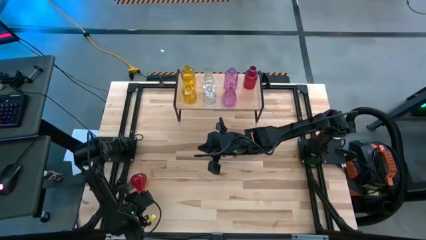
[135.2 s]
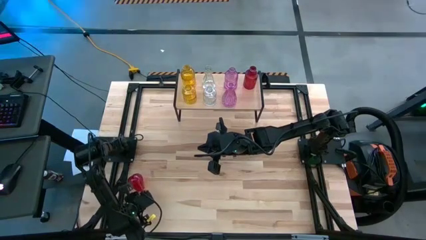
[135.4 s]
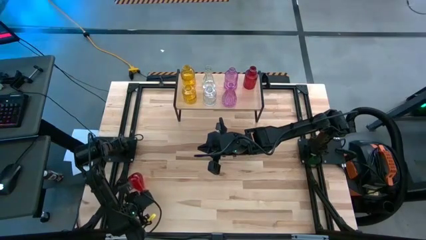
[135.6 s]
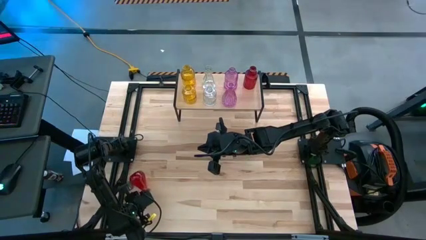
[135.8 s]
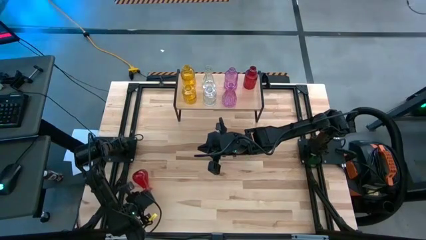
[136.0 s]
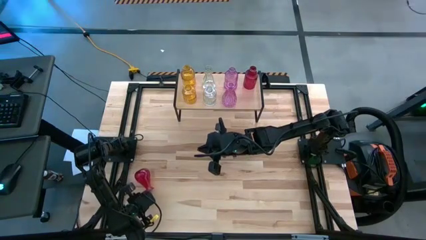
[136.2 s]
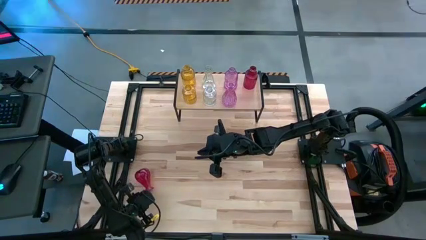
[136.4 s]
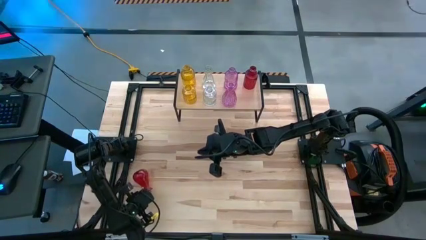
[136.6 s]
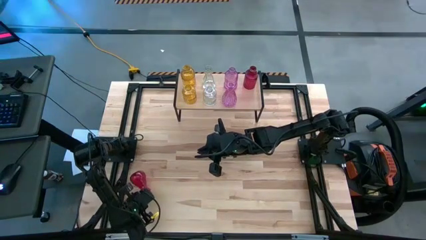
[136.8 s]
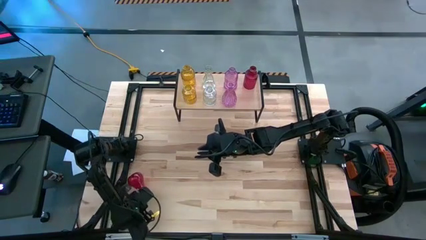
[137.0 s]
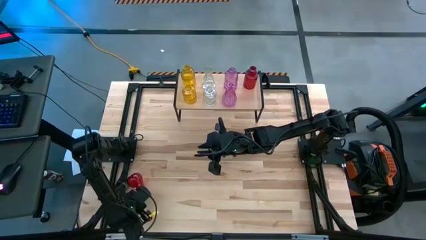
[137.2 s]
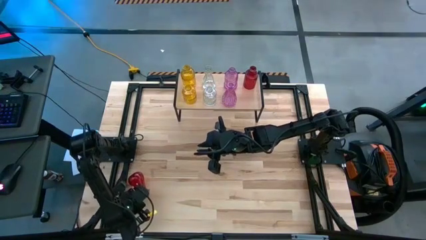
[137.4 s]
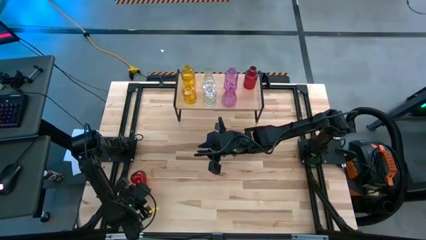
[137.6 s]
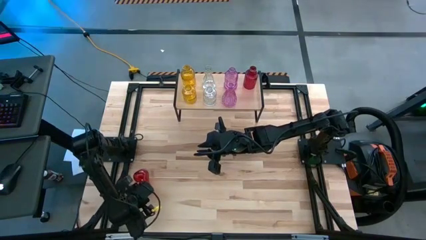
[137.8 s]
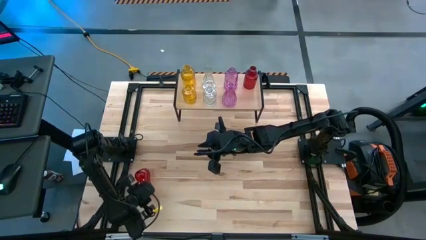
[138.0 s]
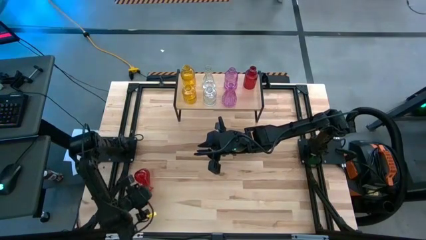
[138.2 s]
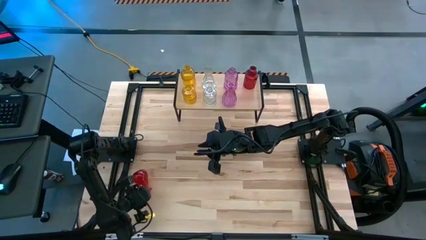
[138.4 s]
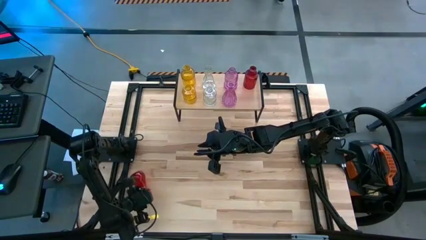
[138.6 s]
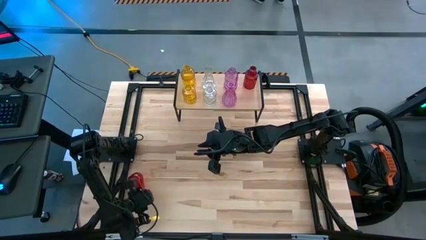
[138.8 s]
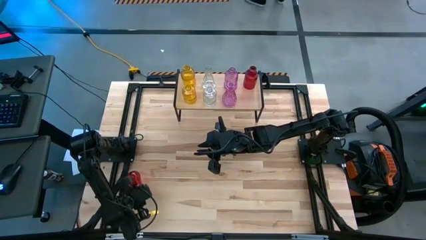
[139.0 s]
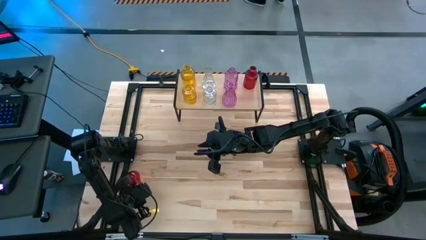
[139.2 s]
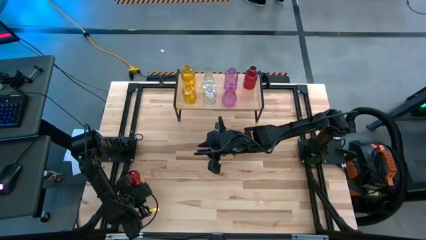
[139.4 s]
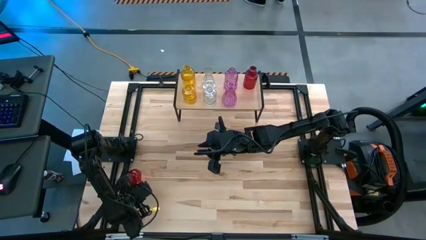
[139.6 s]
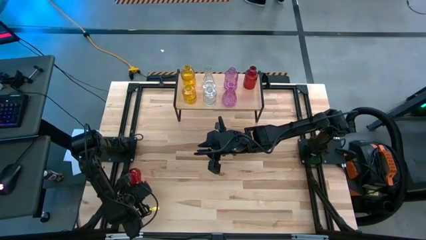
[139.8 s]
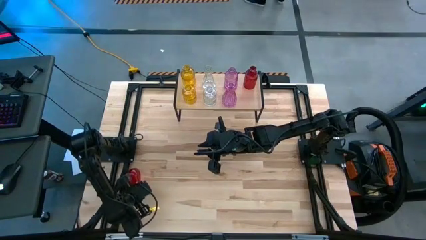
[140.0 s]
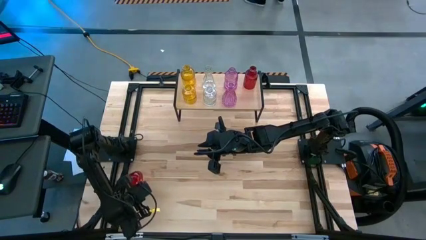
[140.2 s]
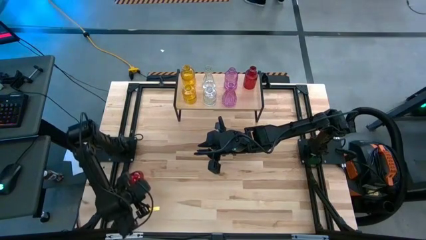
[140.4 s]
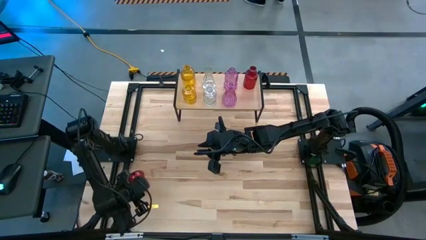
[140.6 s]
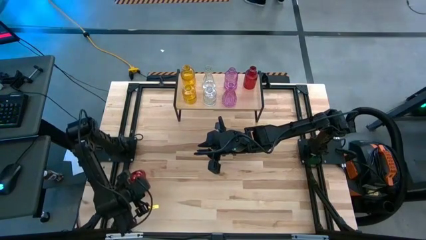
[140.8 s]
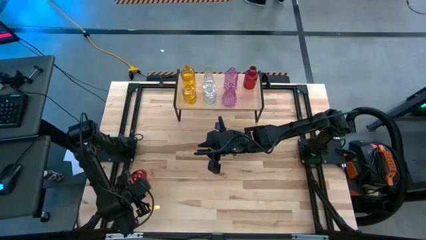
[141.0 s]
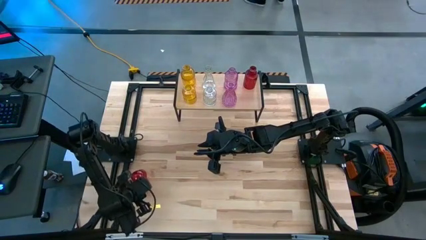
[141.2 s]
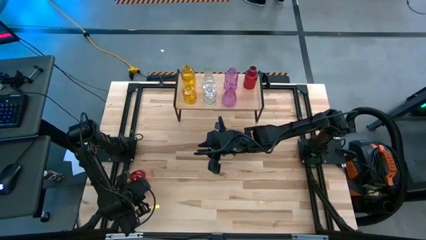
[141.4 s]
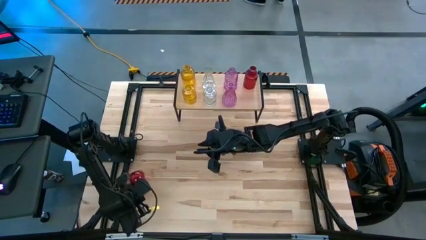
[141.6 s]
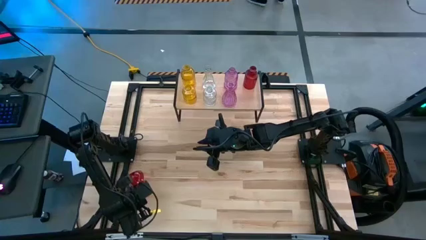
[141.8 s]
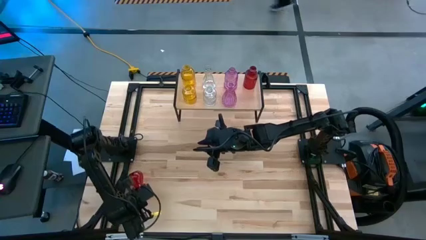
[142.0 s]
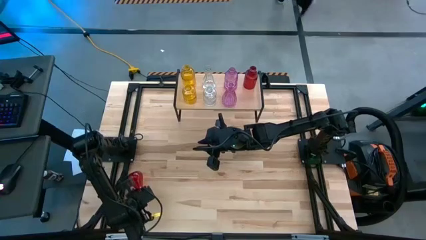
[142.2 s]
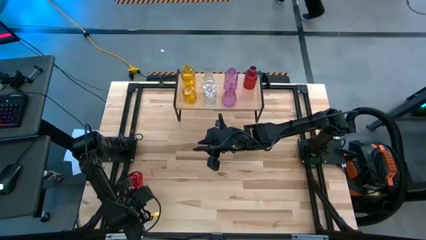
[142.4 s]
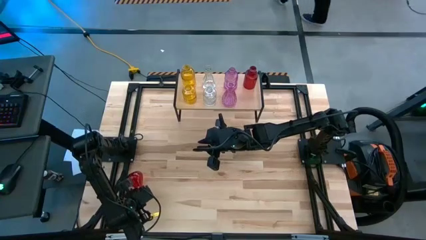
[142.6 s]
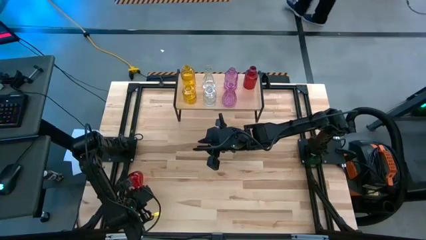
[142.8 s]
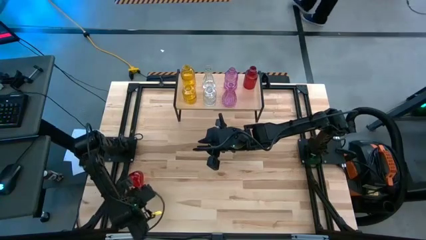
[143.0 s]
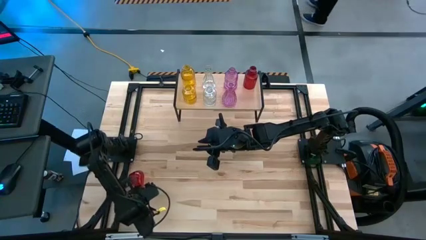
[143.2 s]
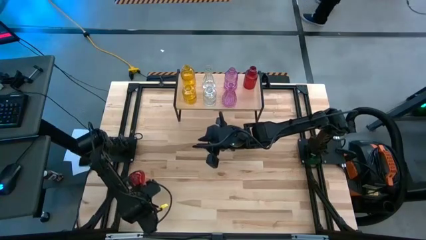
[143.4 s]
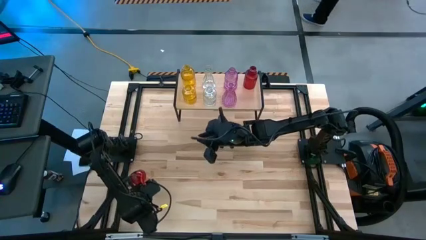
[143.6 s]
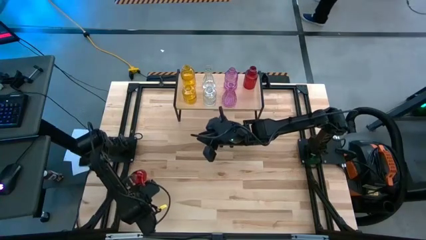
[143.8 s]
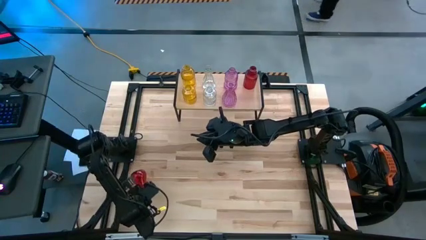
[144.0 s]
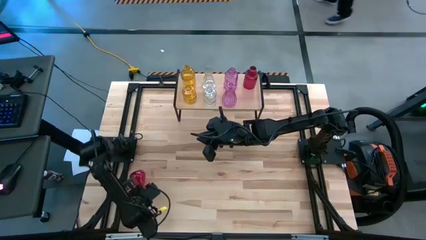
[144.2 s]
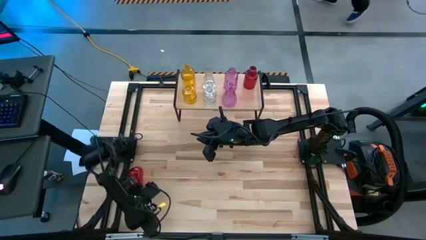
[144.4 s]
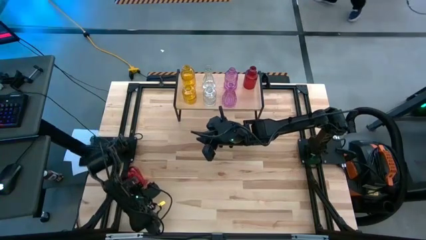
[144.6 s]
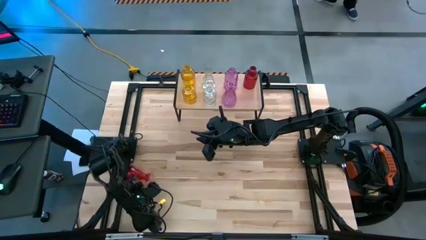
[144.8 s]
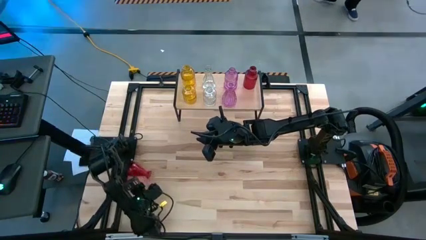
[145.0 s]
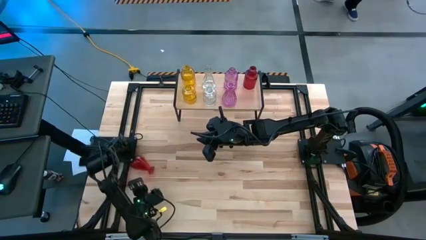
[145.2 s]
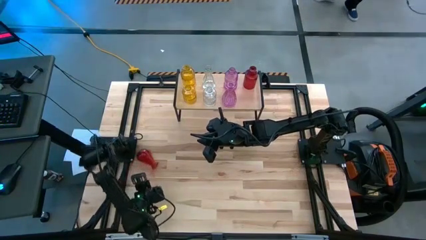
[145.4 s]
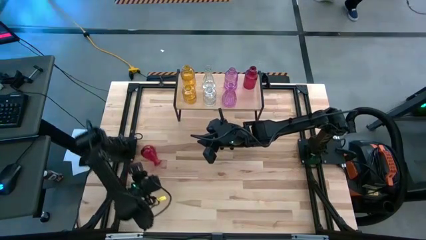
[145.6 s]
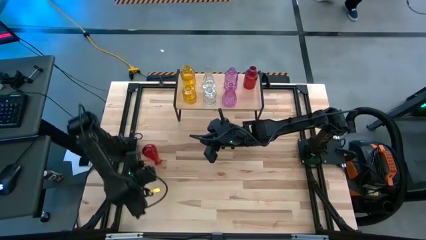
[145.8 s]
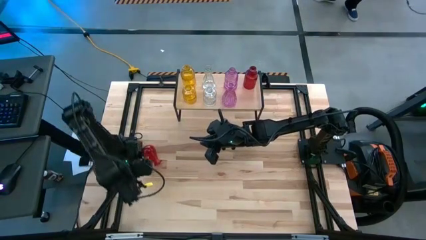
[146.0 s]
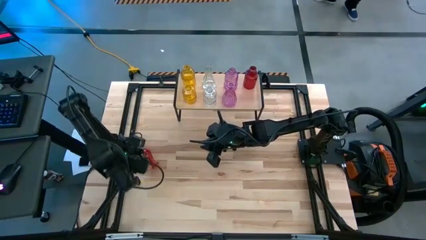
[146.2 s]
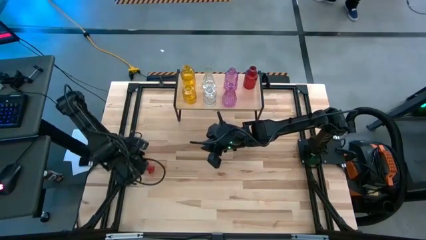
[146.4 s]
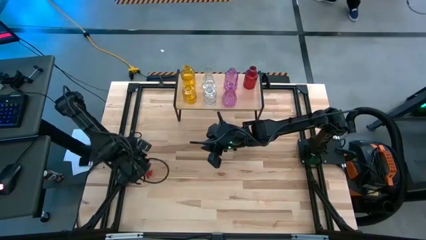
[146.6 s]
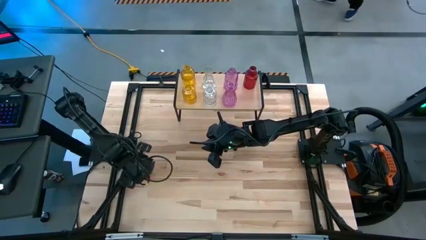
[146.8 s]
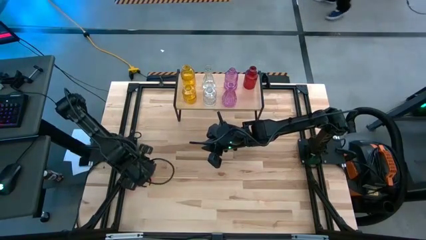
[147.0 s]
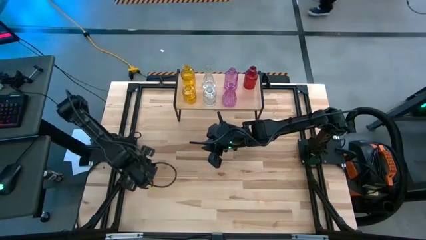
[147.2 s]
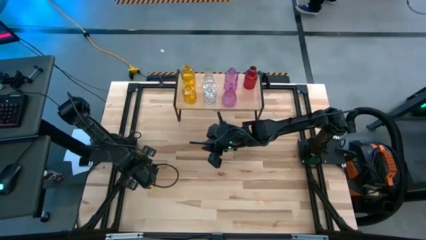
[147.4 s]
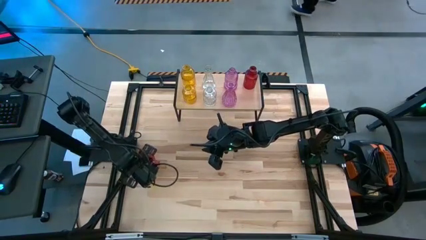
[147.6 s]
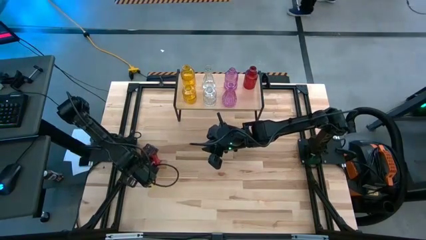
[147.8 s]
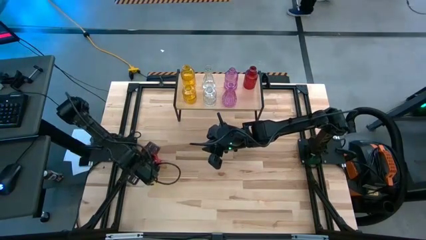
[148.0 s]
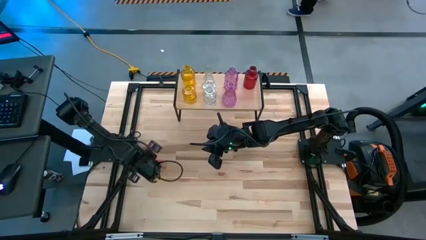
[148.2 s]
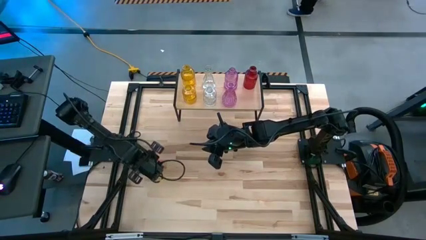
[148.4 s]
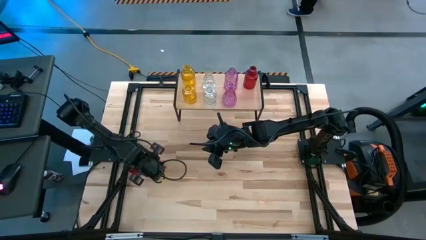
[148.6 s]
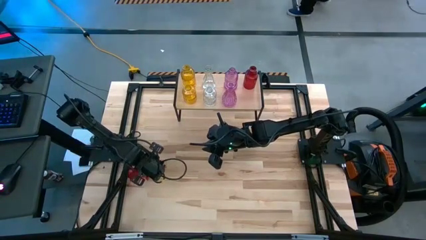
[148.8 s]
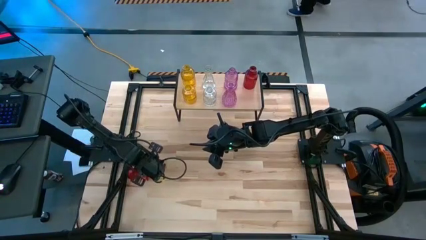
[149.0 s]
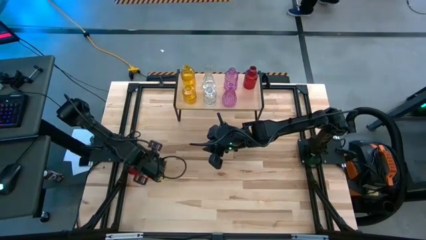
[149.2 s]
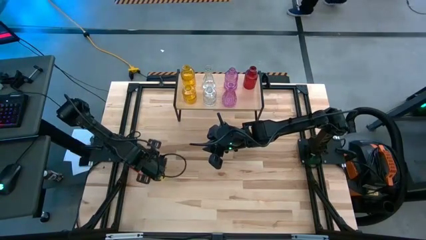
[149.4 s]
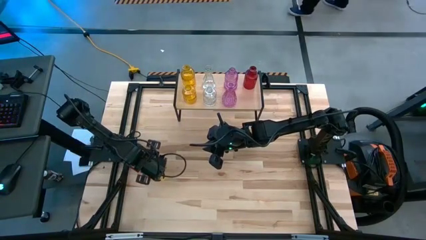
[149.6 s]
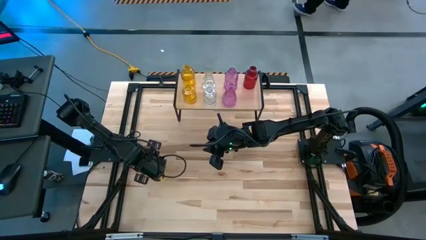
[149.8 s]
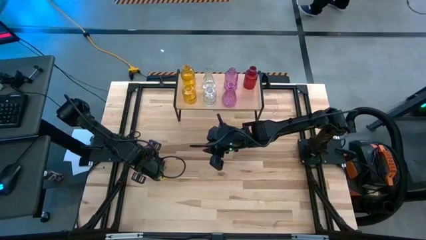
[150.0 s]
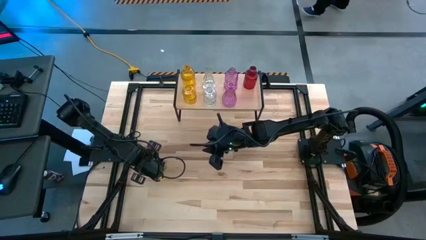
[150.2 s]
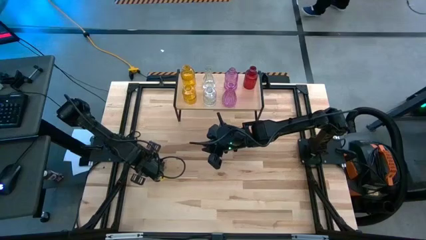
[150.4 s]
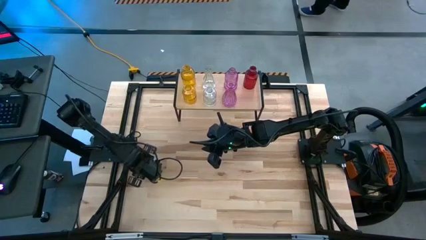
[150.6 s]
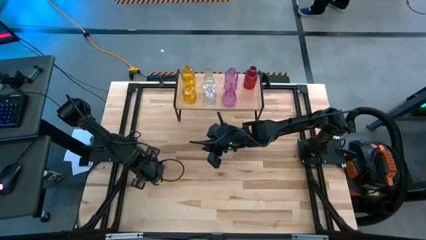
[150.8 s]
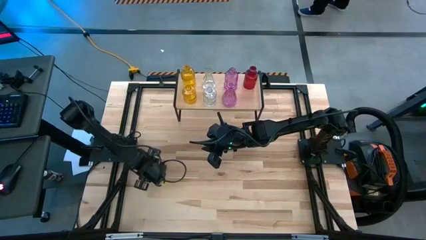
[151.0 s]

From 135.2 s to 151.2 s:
Task: sort vases onto shelf
Put the red vase on the shelf aligned with the other red vase

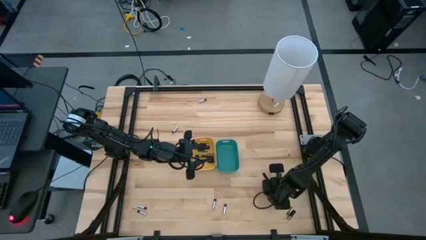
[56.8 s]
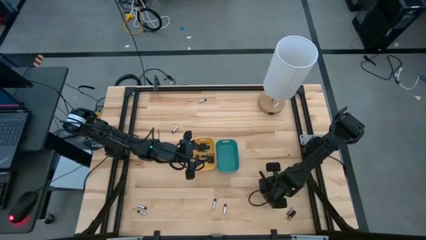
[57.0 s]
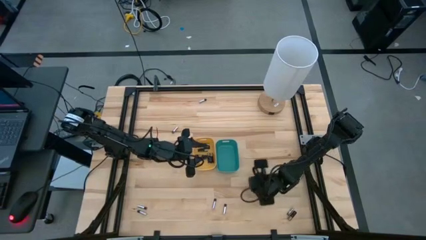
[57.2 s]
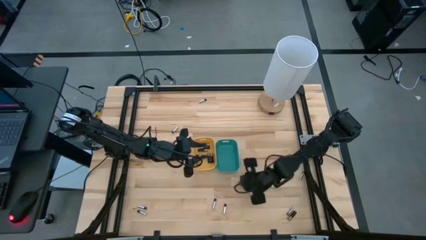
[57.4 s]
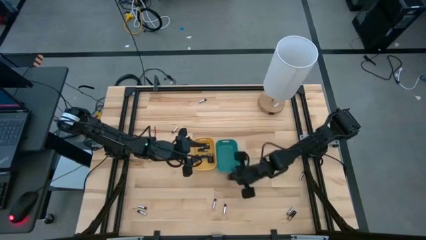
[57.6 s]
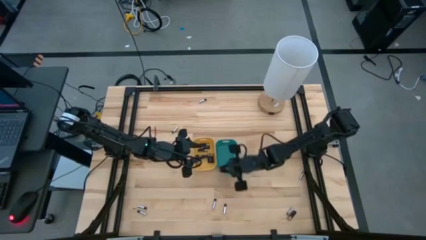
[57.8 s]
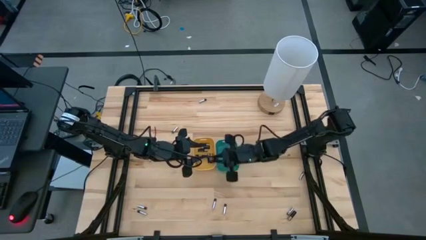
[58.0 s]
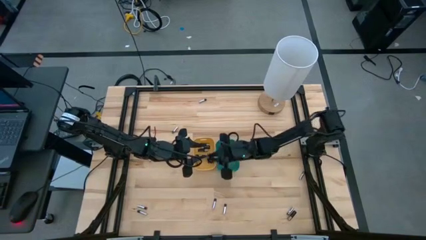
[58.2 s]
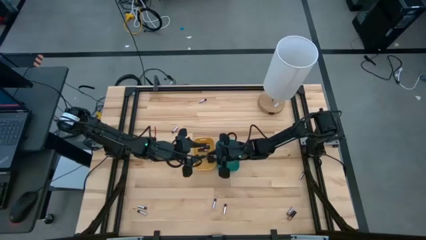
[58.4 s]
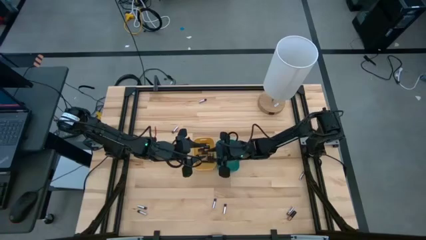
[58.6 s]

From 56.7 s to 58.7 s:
Task: Sort batteries
Put the black battery into the yellow bin
